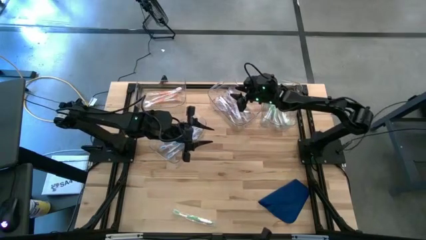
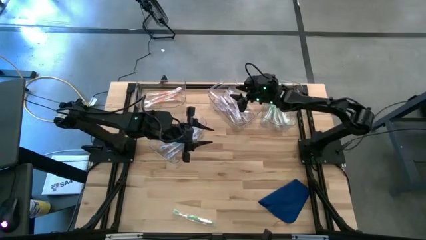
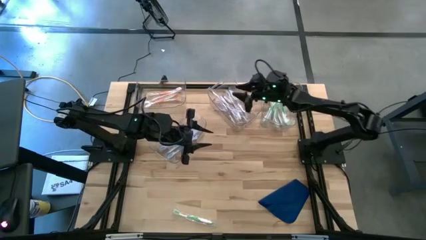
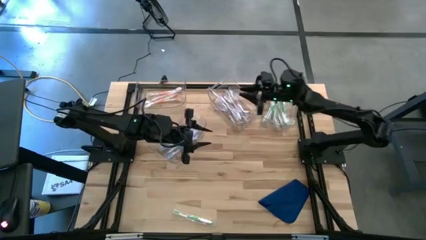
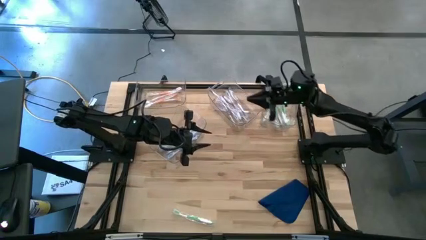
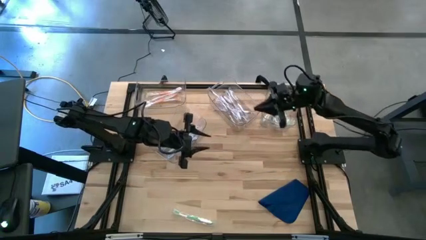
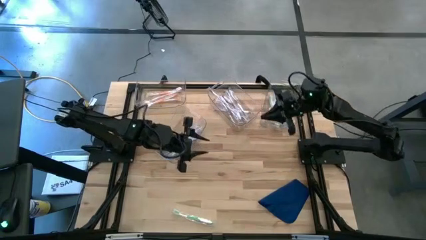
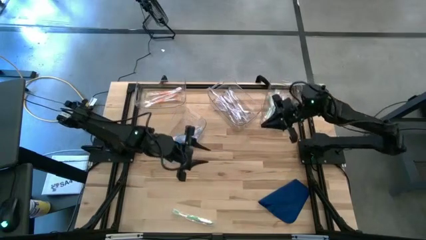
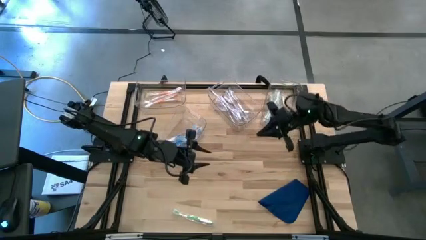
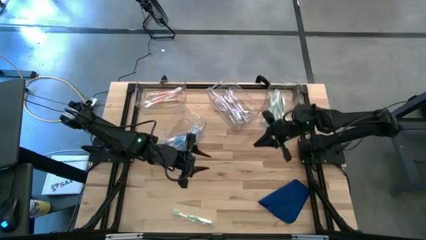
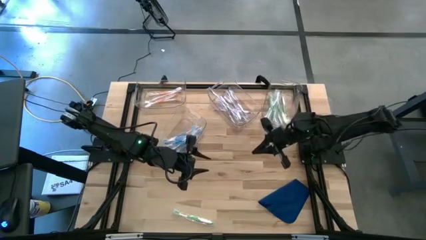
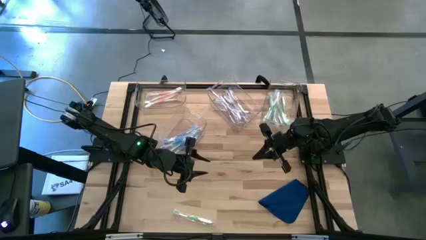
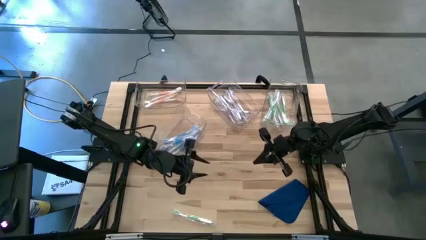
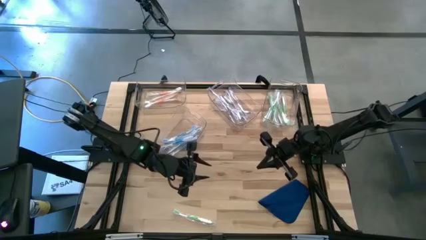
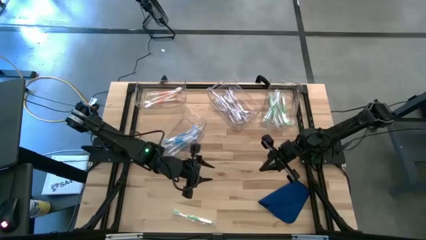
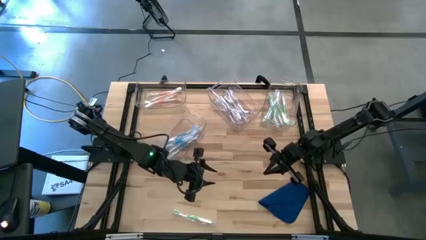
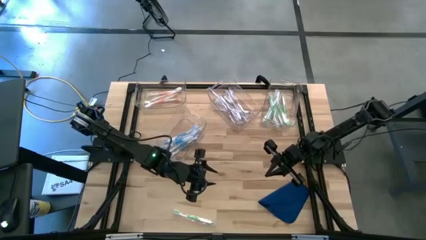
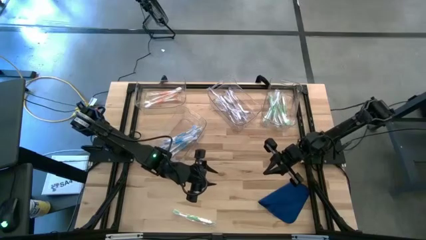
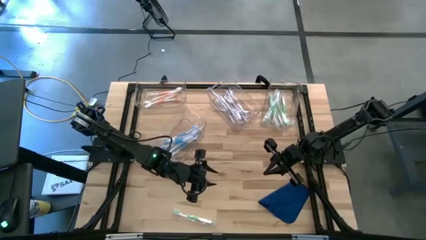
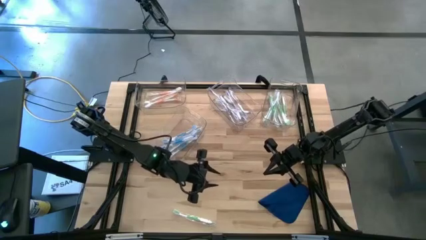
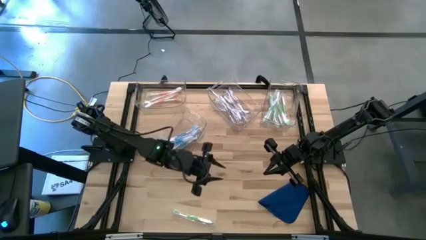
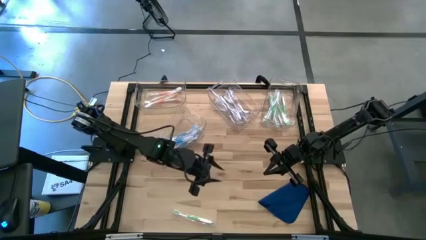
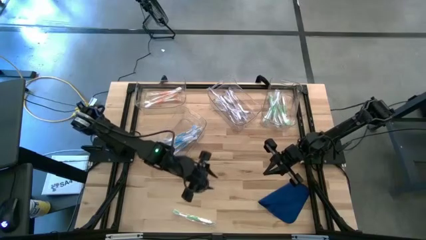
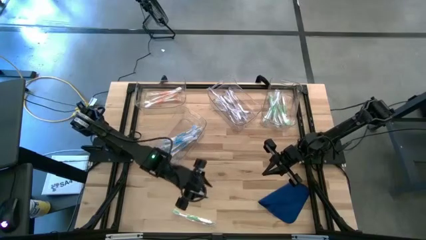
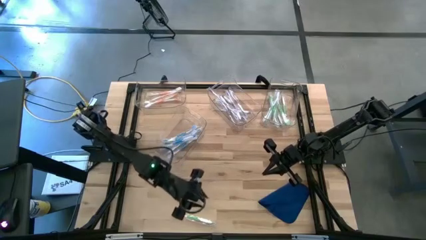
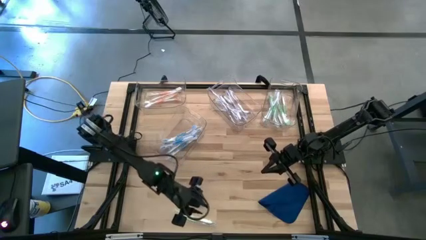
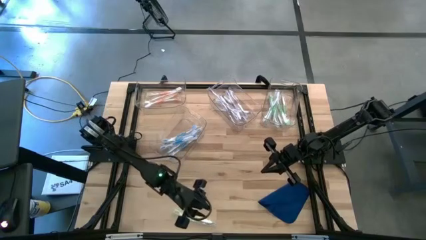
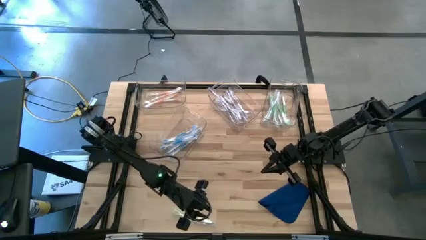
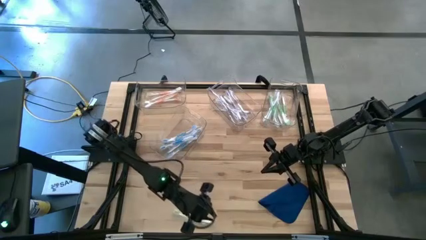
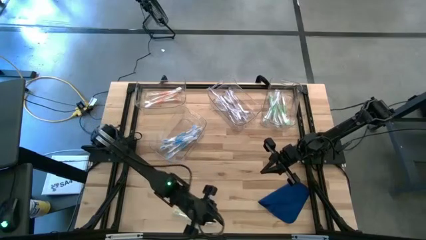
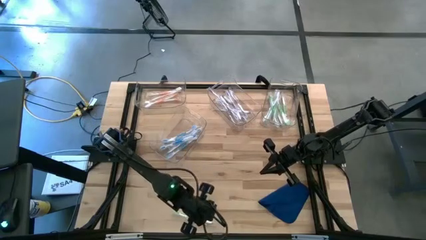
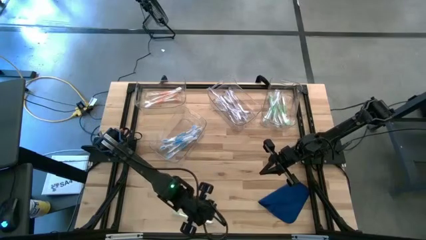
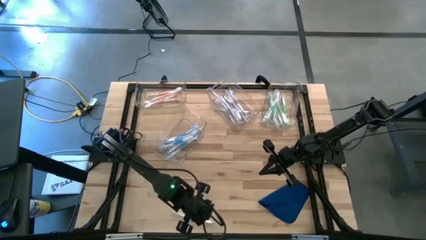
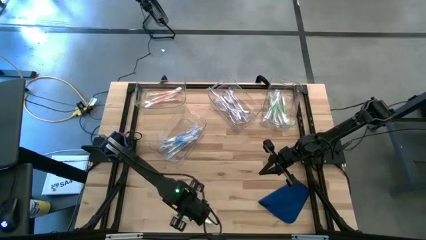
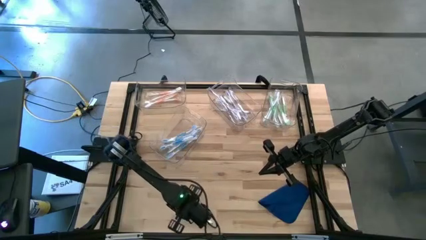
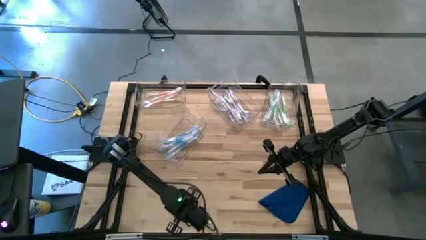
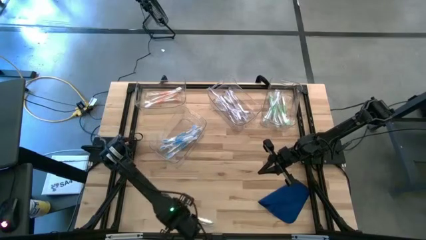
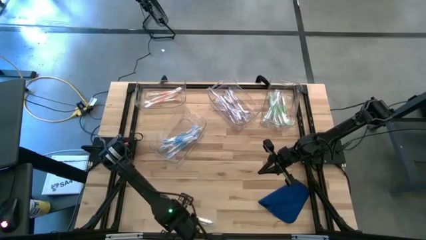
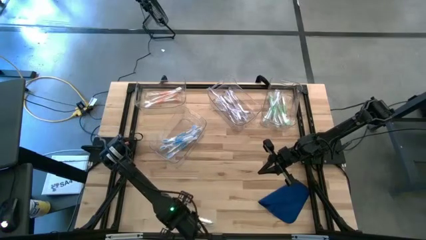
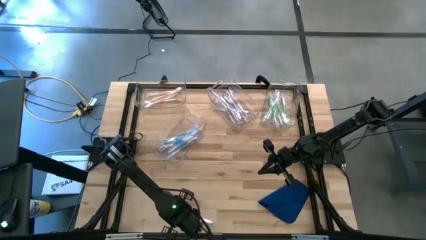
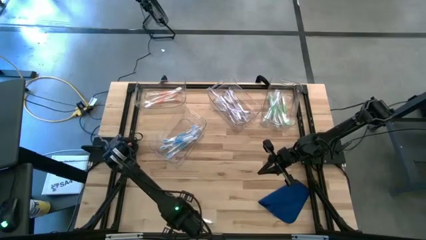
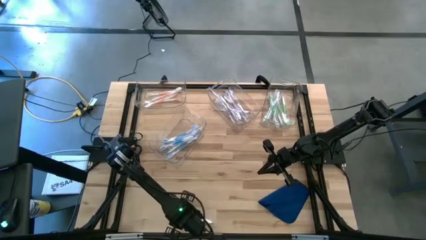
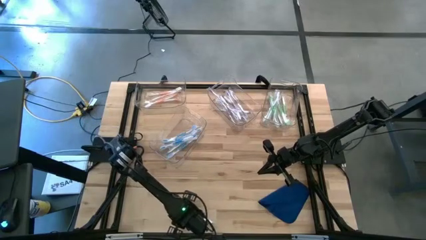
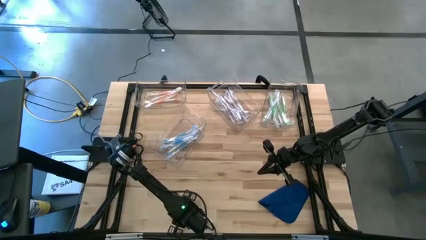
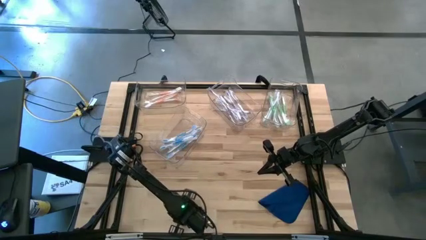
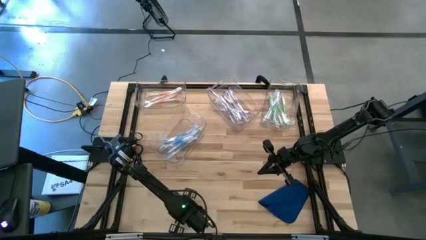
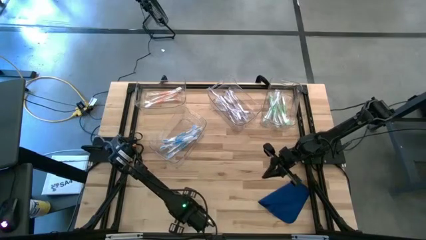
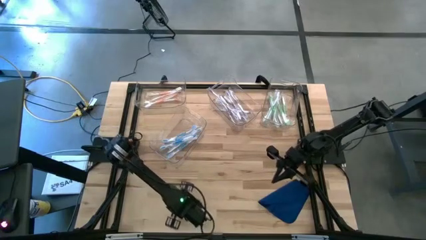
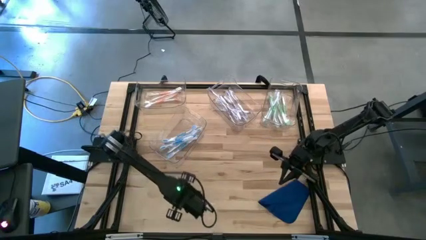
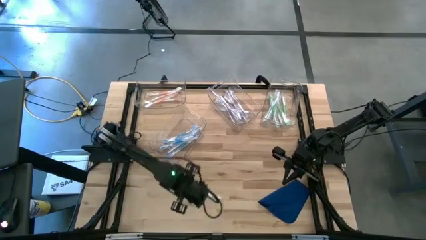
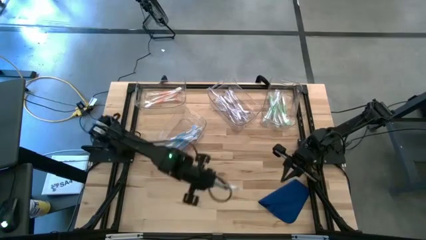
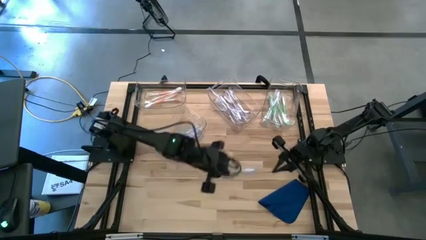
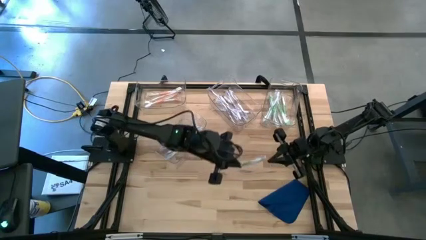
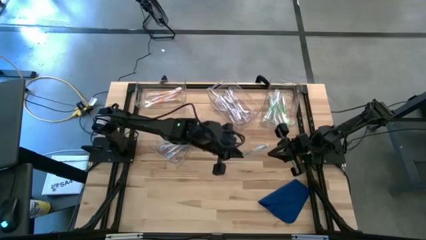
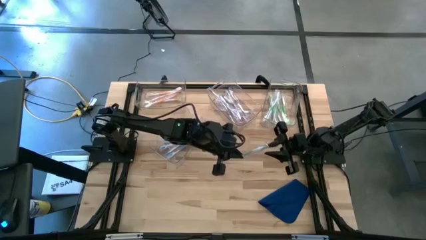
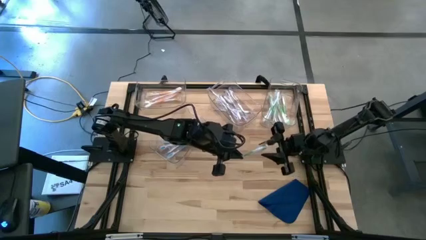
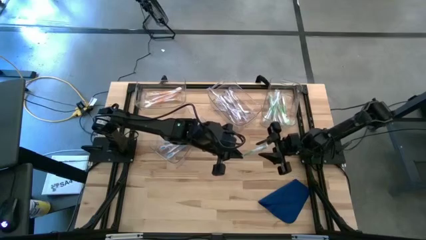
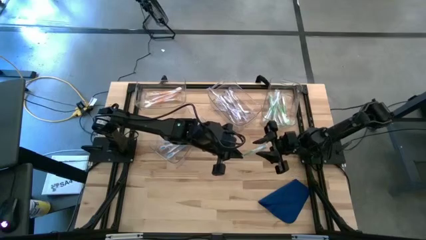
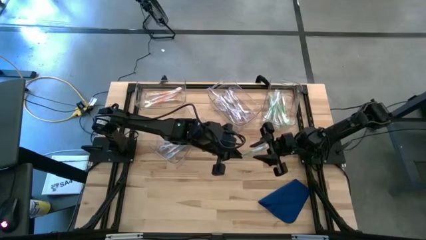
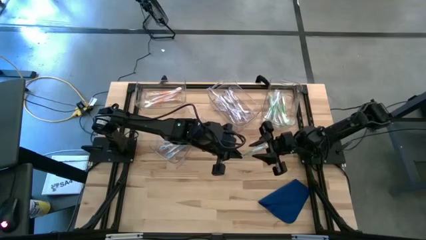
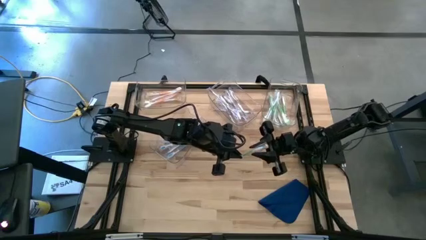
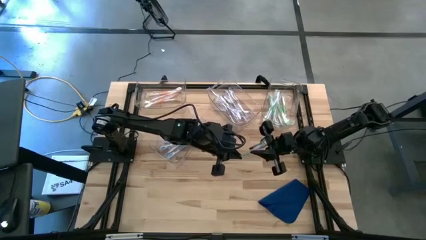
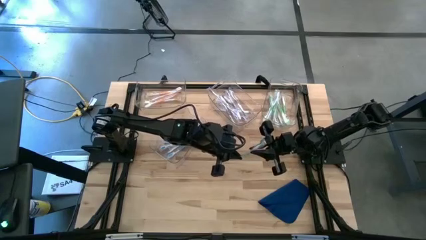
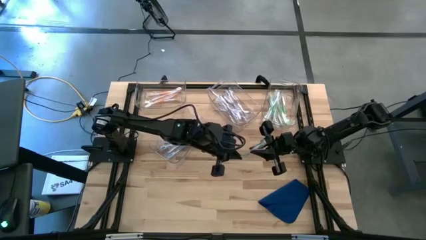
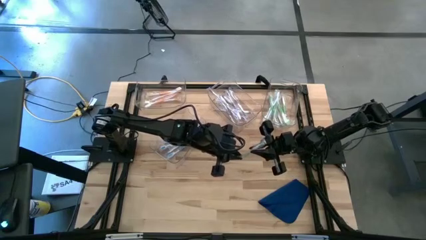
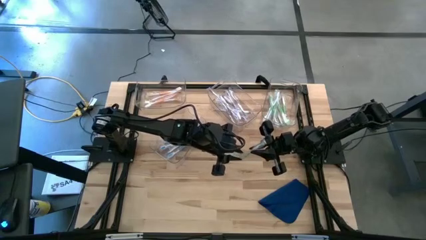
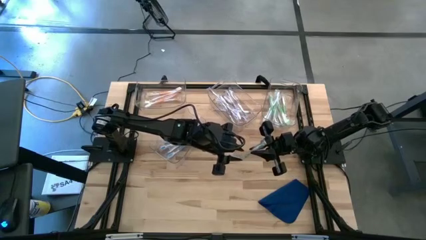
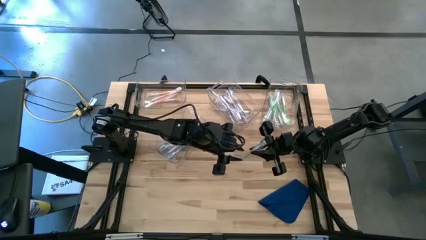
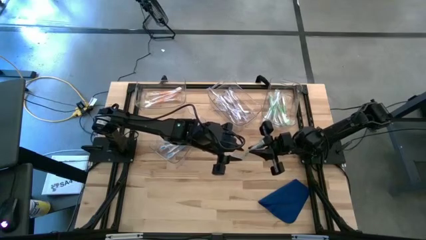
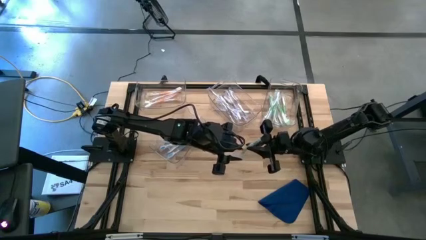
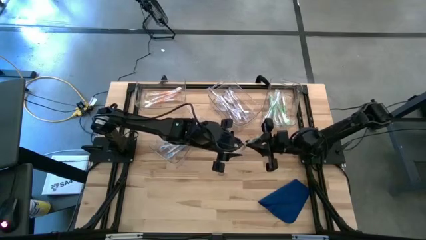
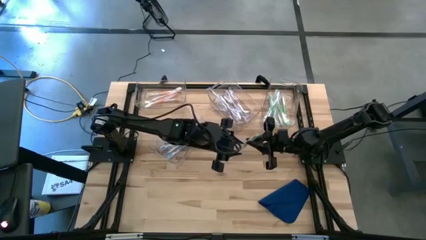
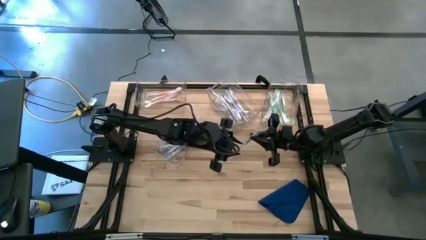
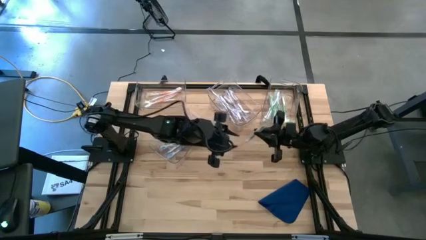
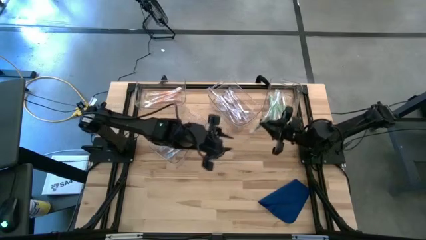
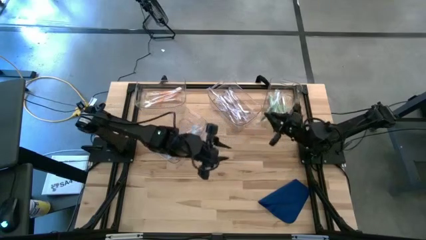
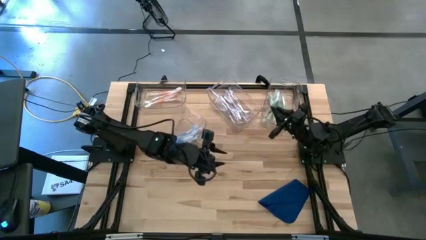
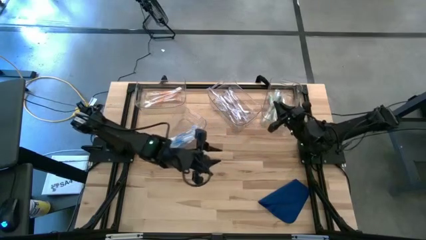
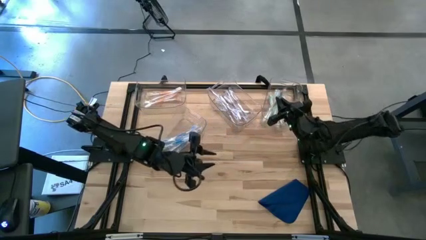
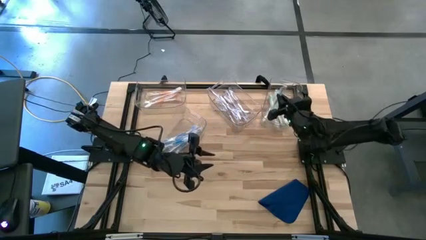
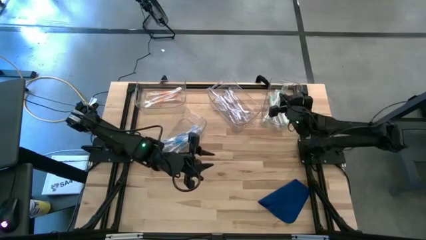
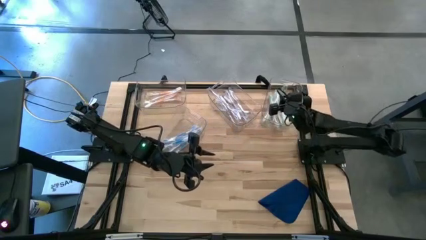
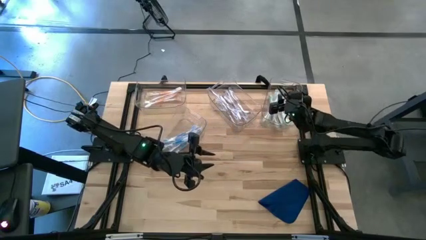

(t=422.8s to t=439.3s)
Task: Pick & Place Toothbrushes
Put the green toothbrush into the top right transparent bin
